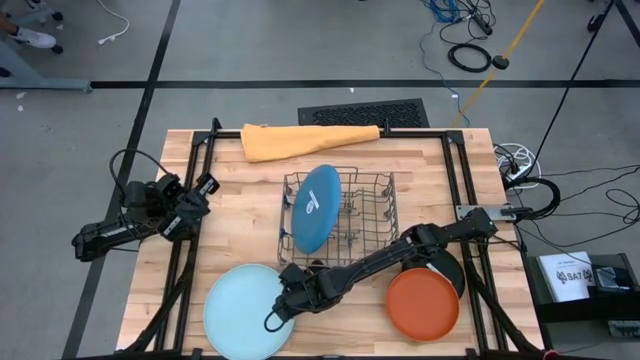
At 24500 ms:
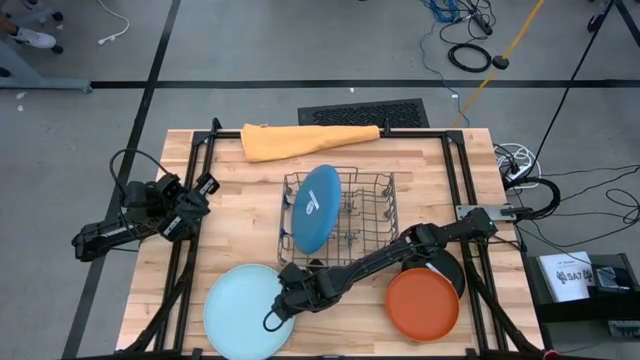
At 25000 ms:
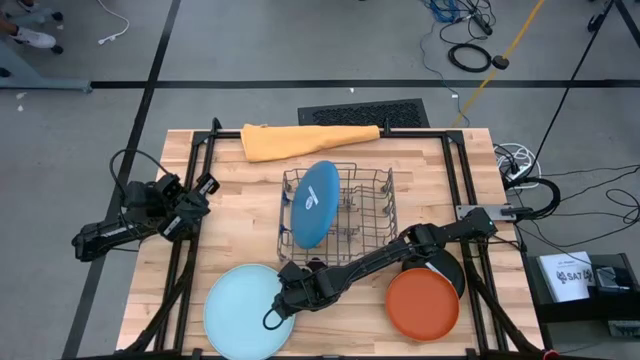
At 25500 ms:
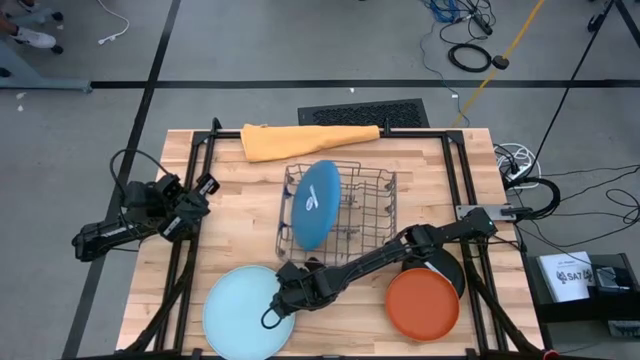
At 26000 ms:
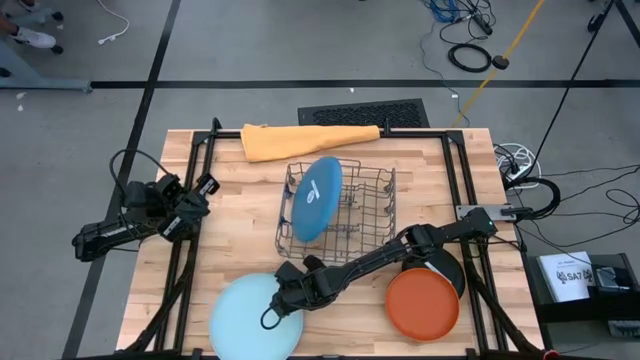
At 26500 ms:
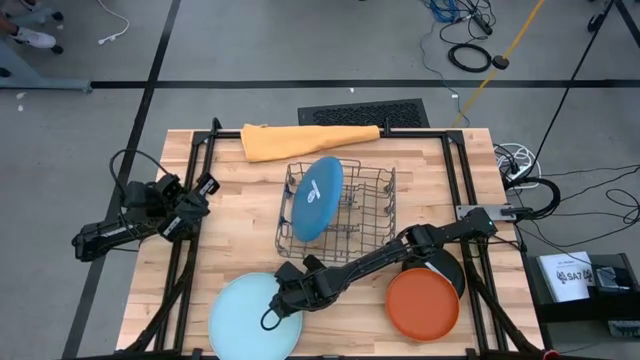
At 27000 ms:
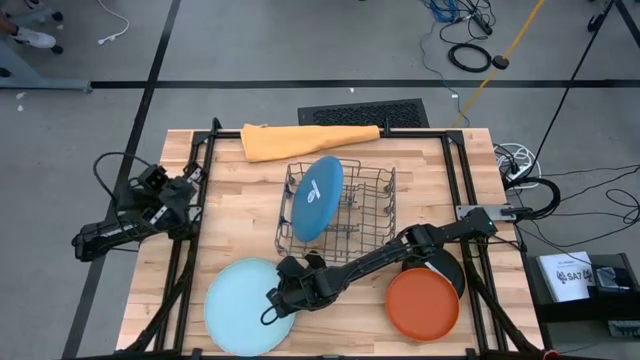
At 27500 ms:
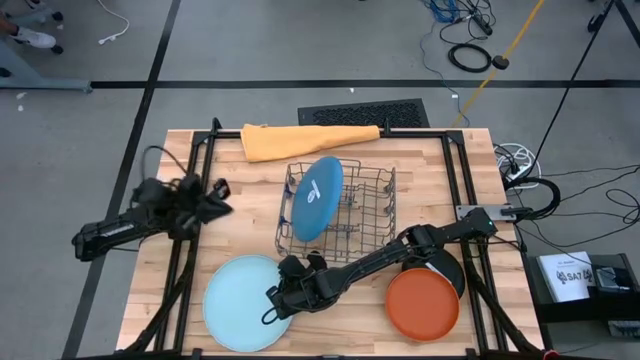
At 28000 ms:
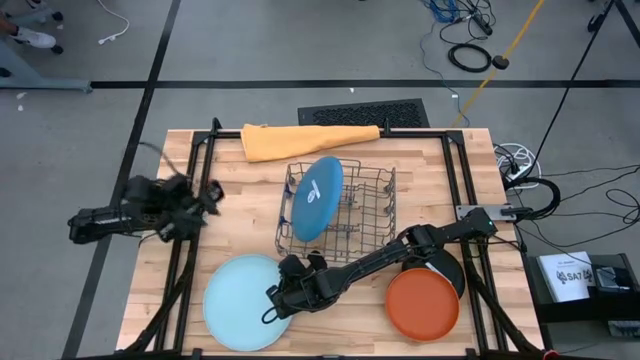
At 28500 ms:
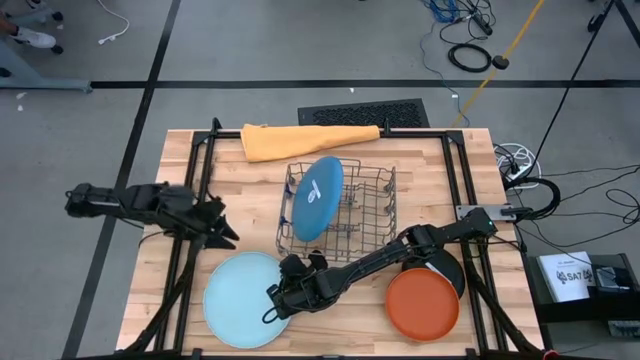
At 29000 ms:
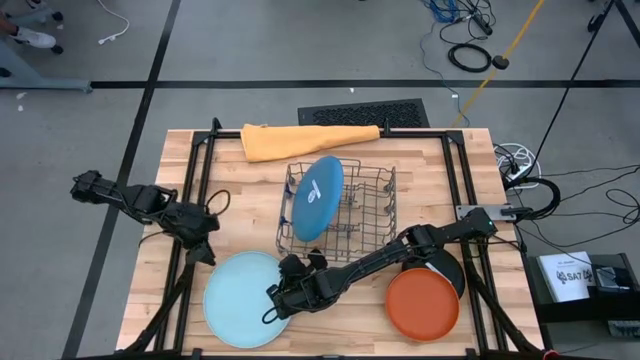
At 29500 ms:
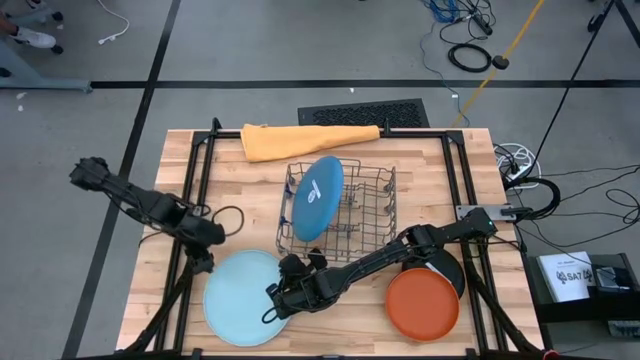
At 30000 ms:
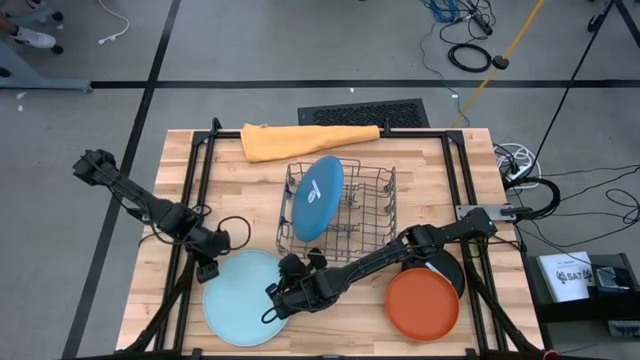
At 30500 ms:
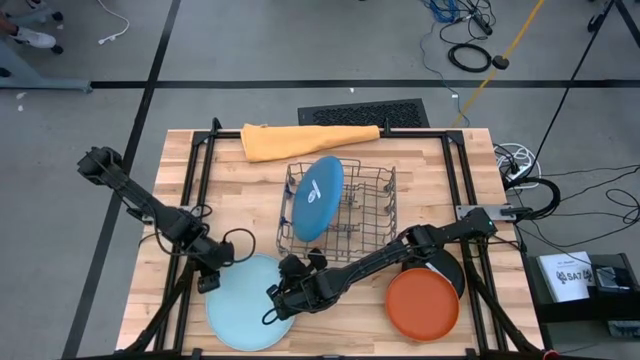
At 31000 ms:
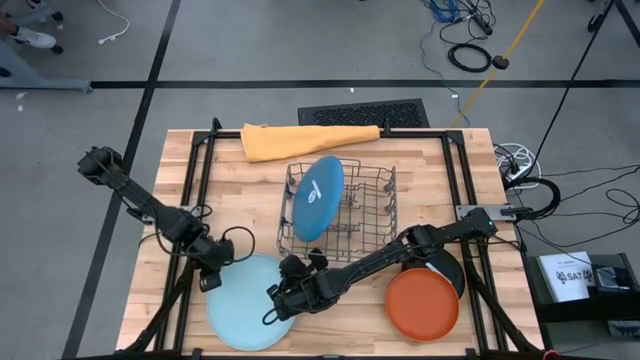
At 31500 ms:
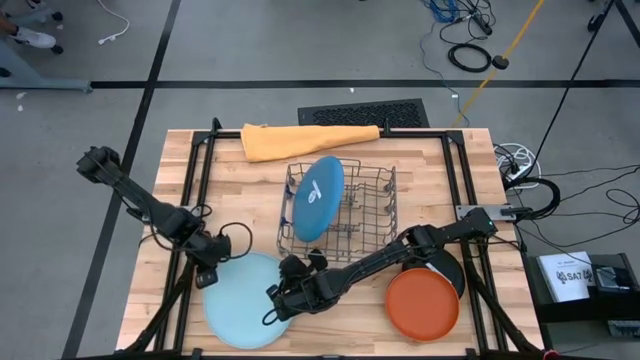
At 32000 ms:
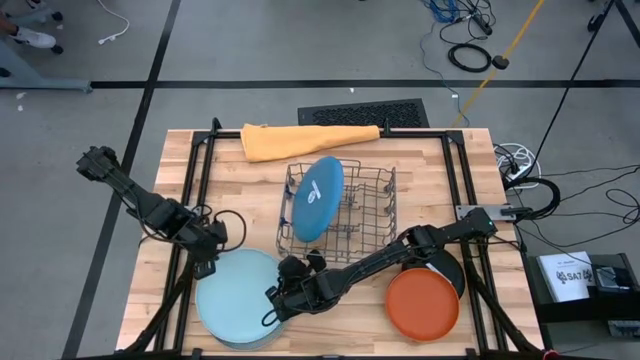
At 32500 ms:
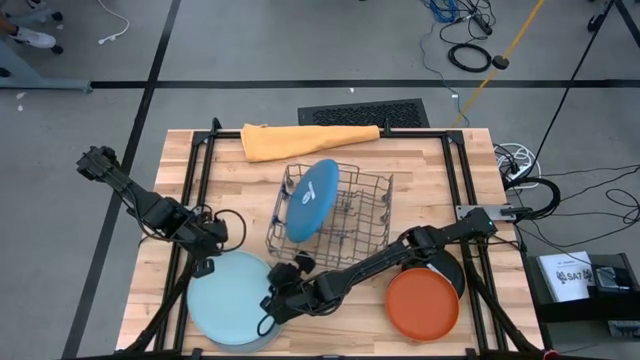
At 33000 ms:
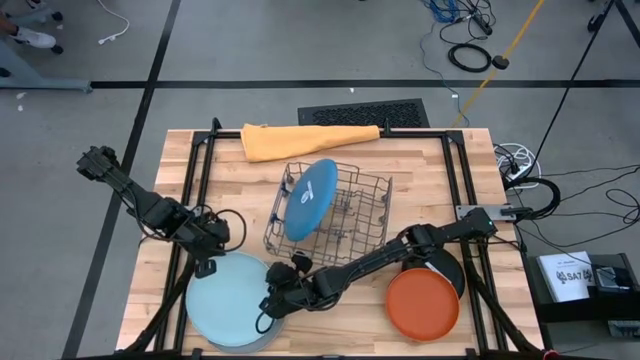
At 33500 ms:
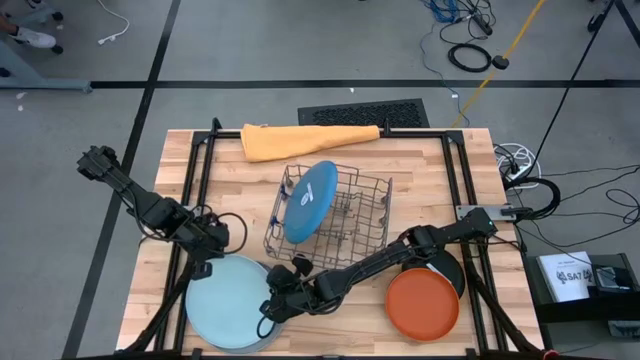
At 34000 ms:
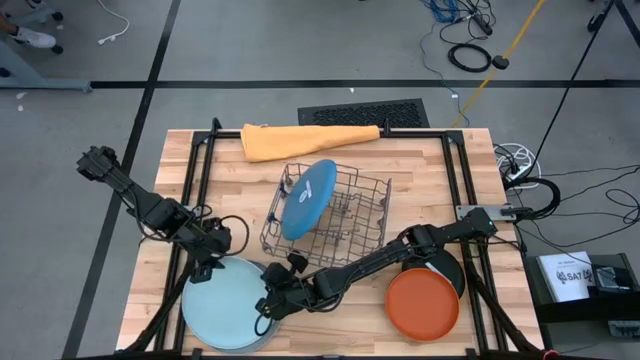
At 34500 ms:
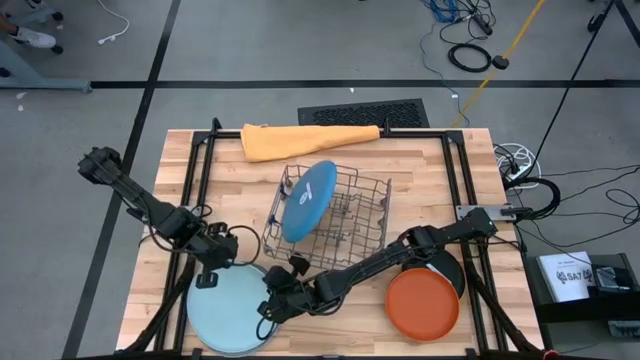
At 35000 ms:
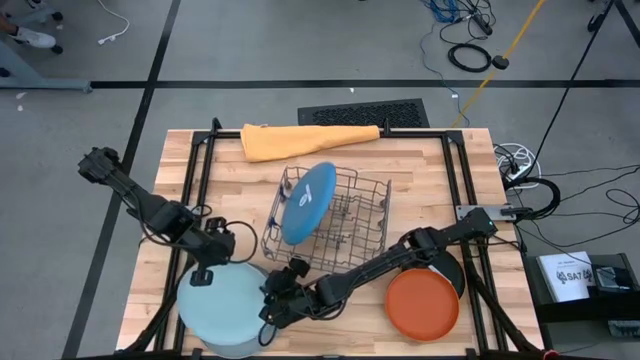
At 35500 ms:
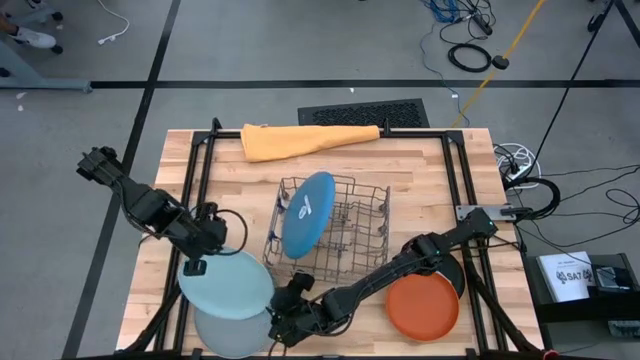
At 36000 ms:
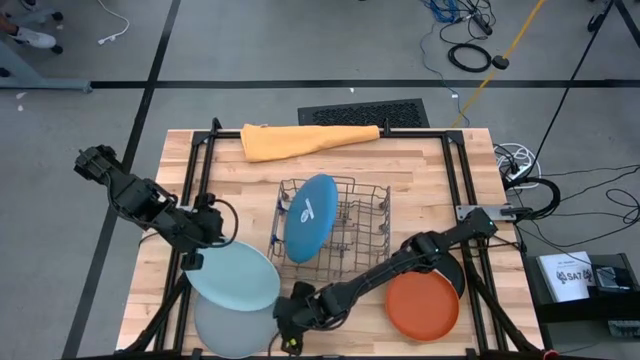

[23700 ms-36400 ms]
Task: Sort dishes
Put the light blue plate in the dish rack

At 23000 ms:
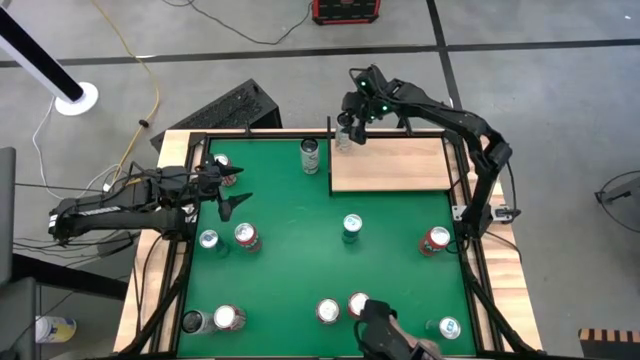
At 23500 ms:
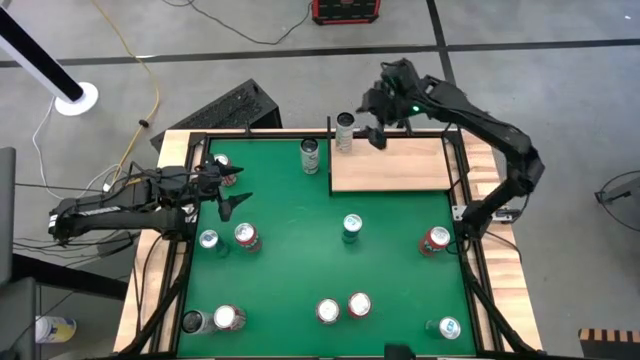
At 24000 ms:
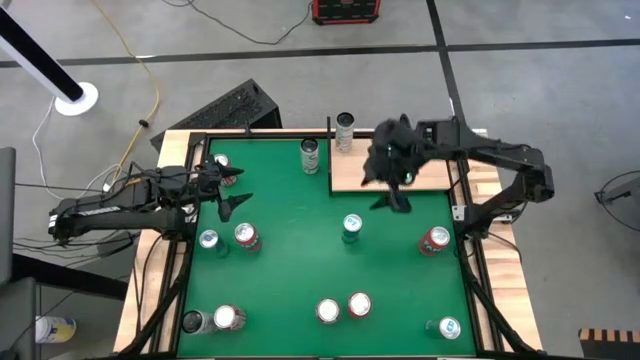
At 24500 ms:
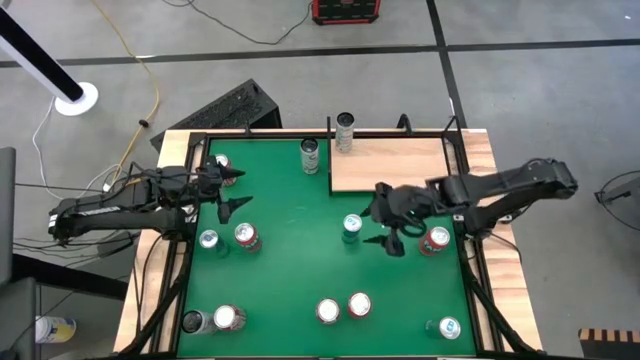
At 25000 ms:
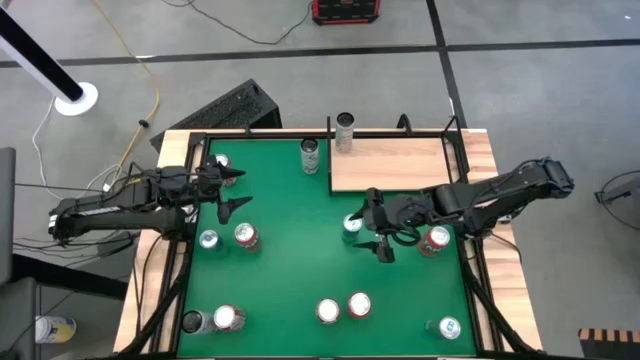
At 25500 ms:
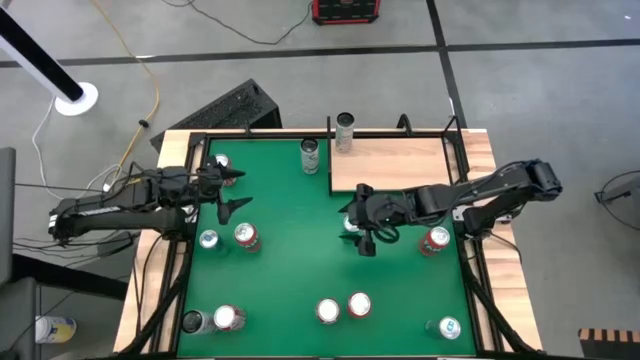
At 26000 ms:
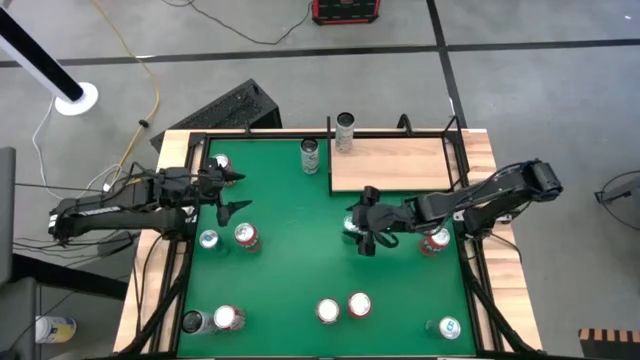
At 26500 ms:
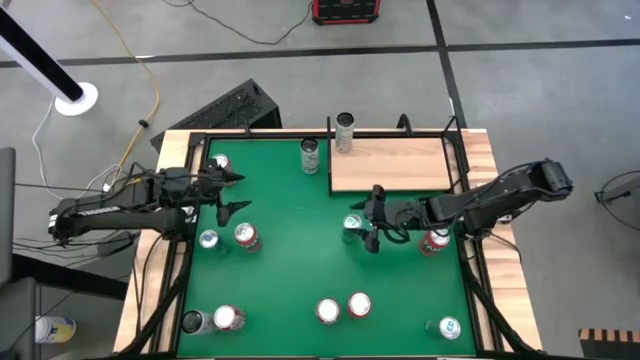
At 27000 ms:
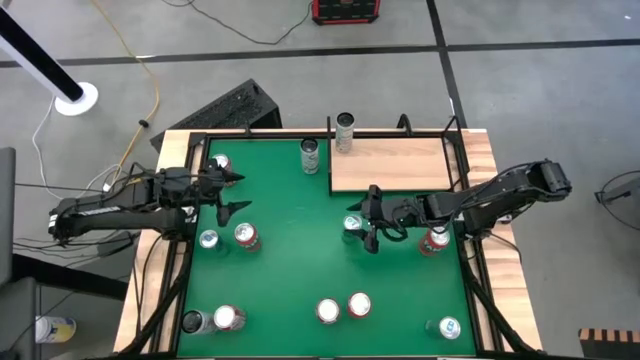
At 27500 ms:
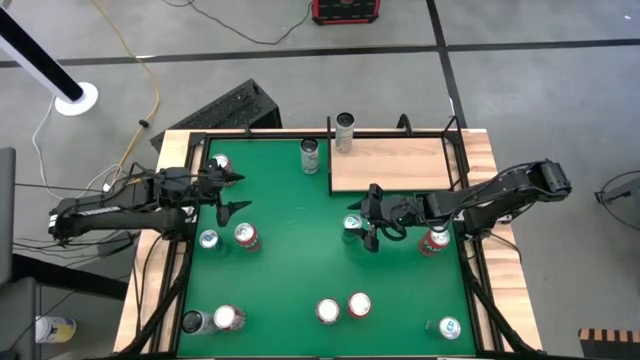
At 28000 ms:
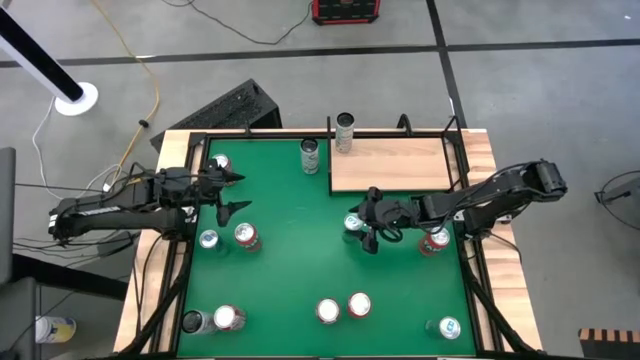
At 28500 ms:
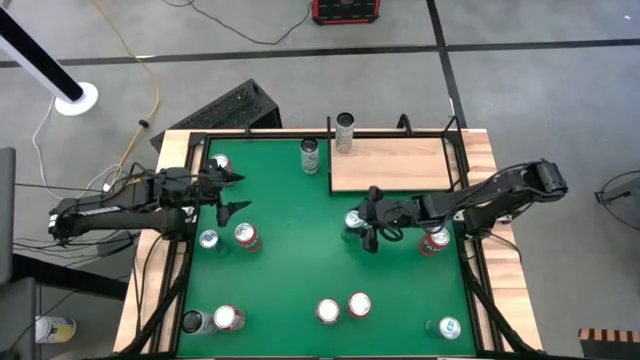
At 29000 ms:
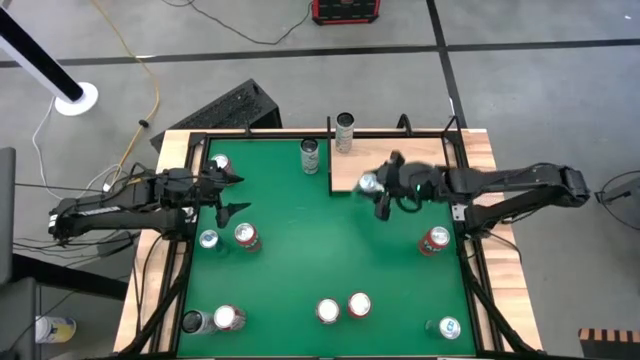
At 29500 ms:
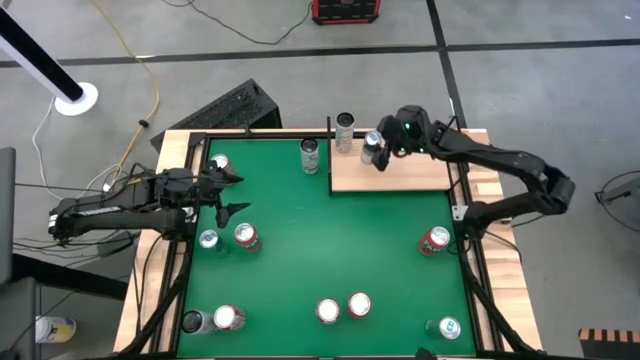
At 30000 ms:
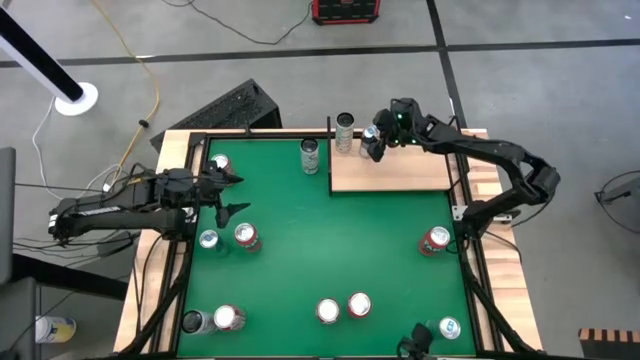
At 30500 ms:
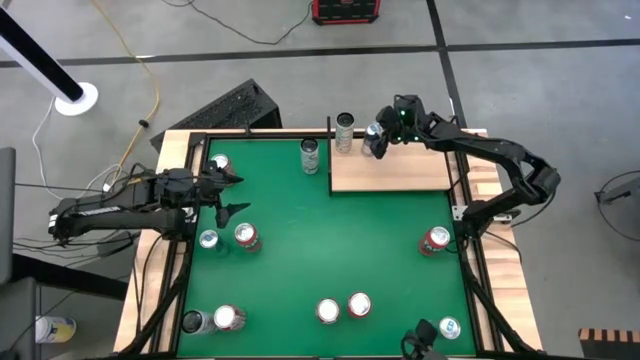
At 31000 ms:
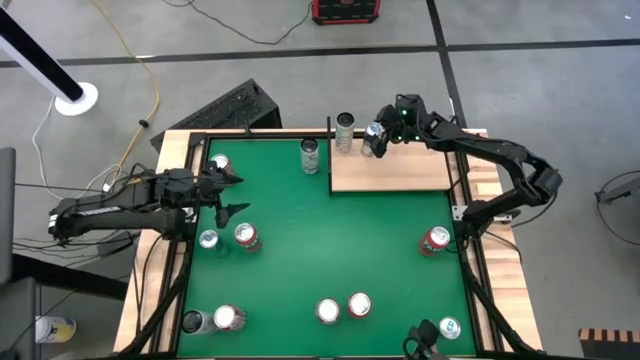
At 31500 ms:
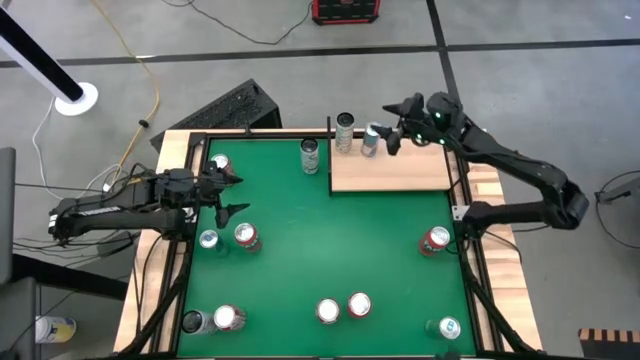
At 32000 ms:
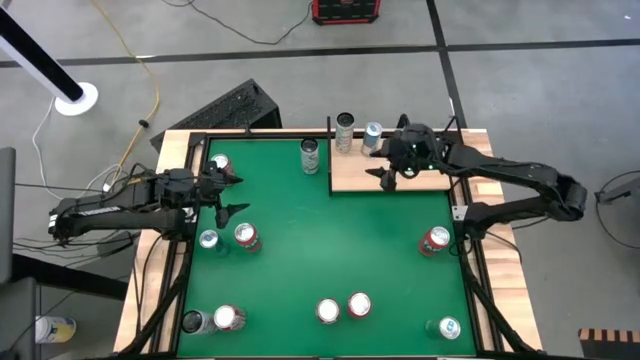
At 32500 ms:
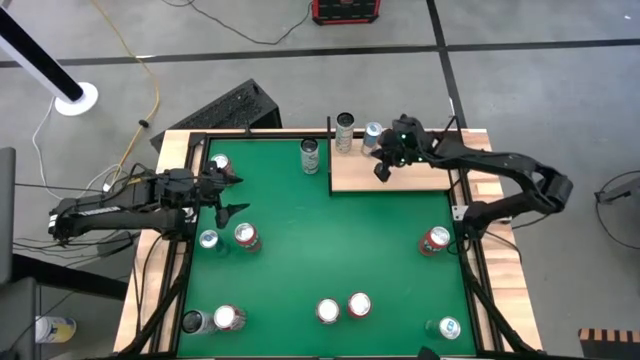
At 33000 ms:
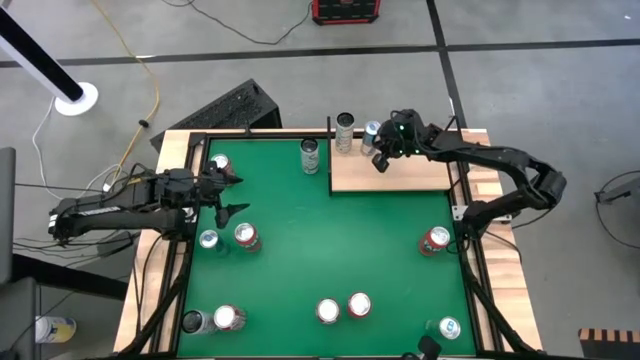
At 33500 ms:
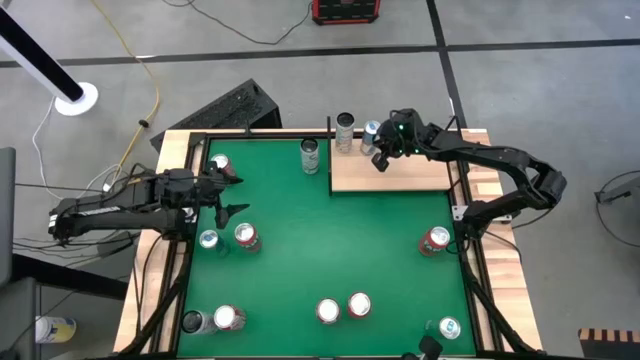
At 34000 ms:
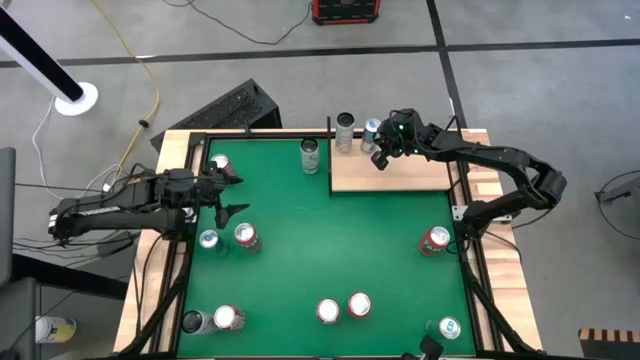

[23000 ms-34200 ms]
Task: Sort soda cans
Put the top right blue soda can on the shelf
